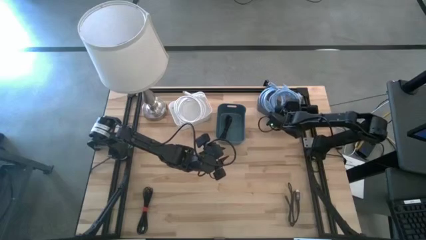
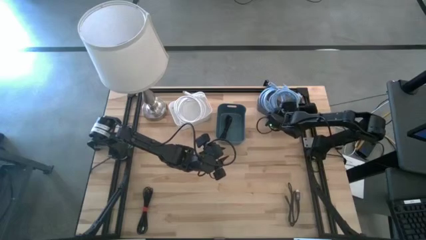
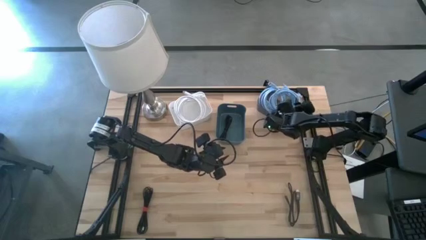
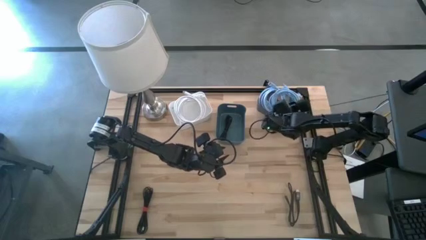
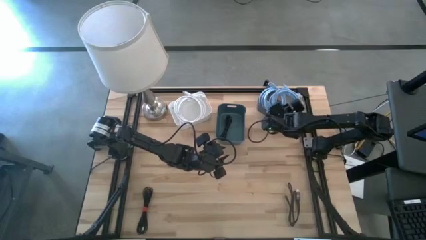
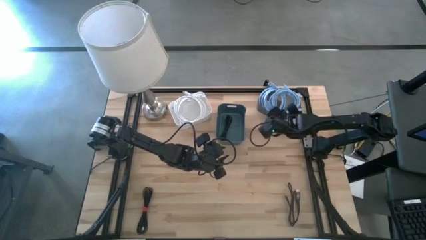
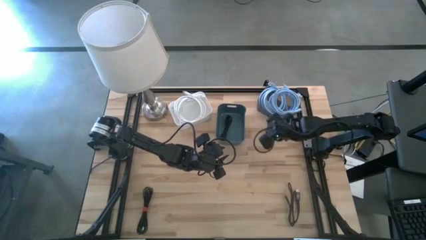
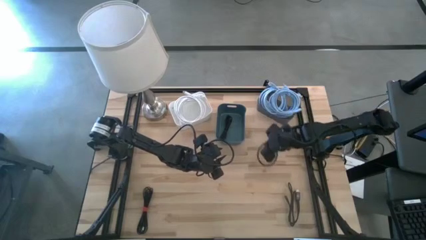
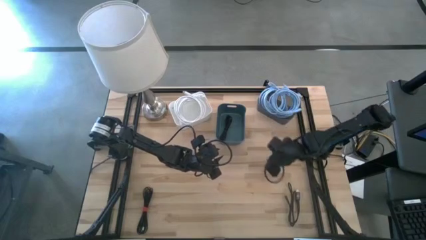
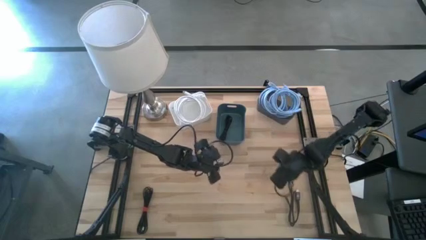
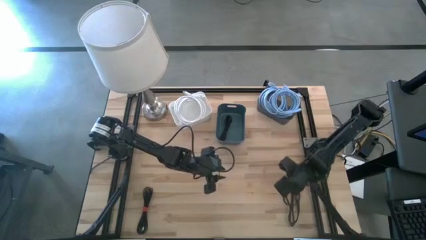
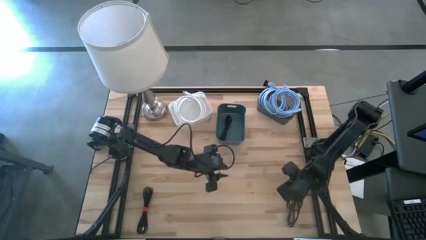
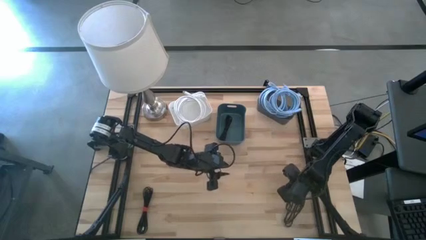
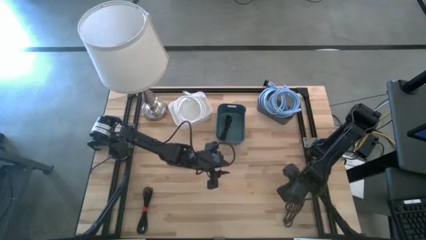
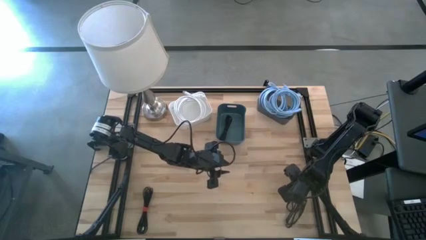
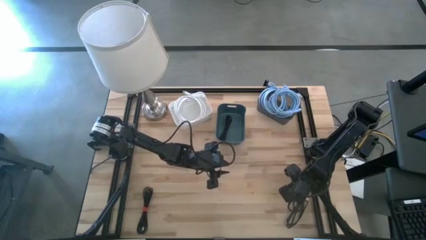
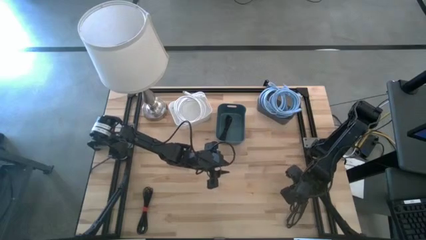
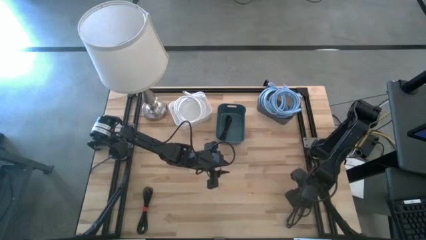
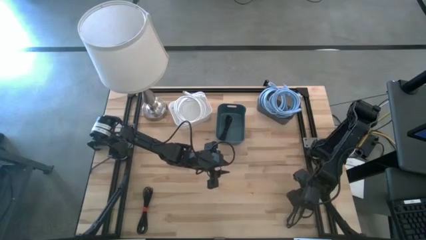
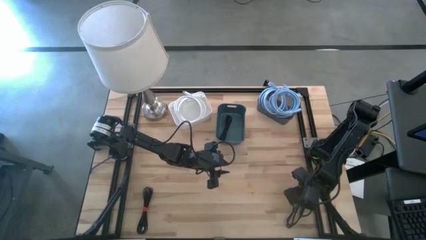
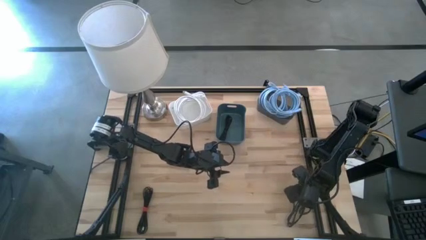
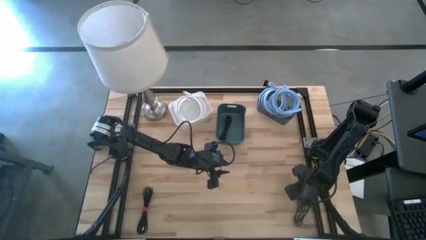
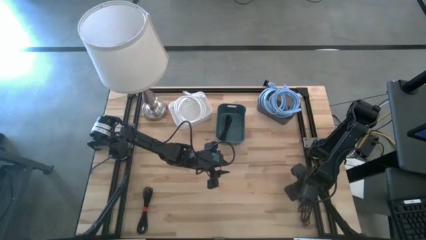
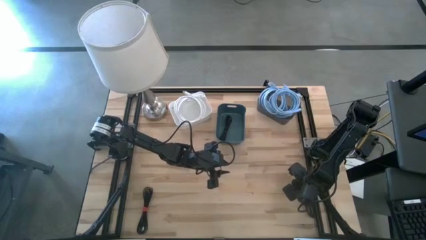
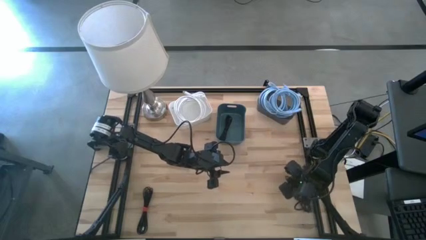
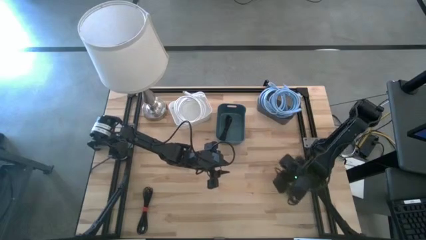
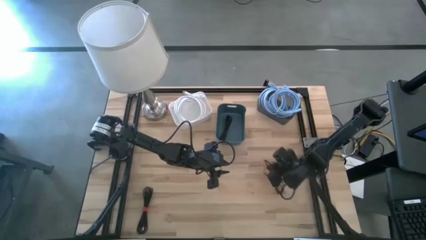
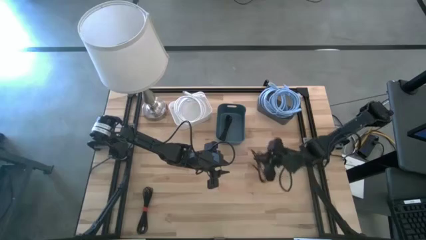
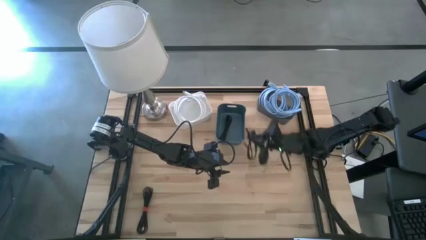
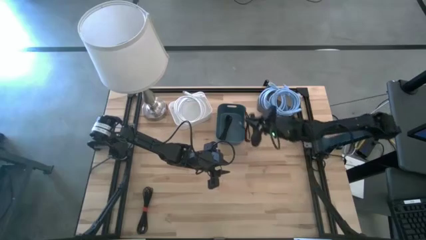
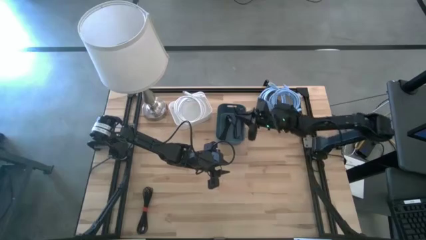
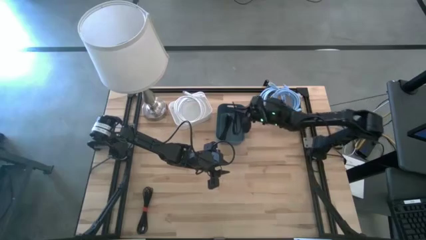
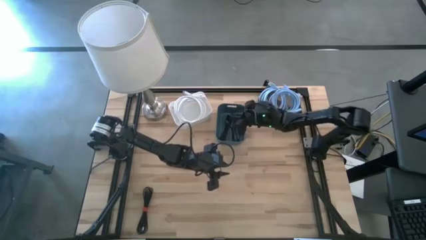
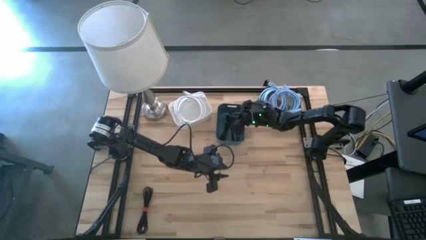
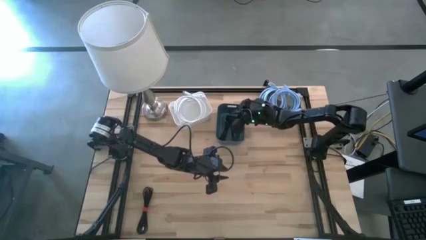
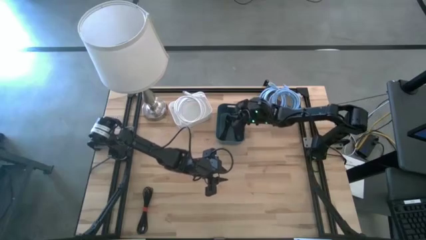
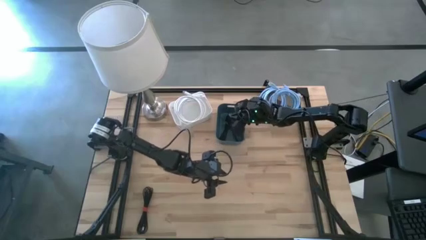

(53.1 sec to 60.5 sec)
Task: Sort HDMI cables
Put the right black HDMI cable into the blue bin

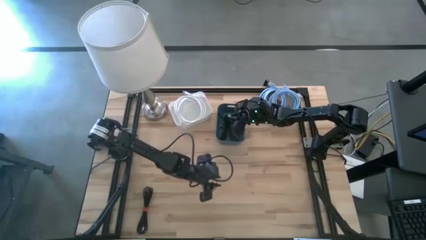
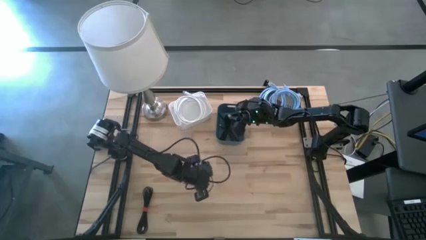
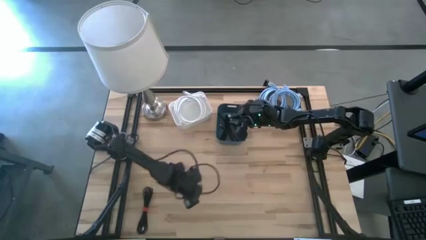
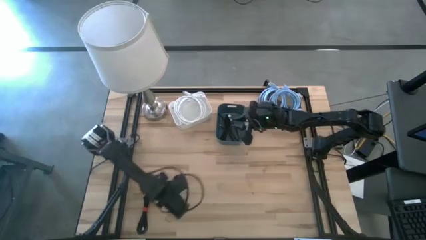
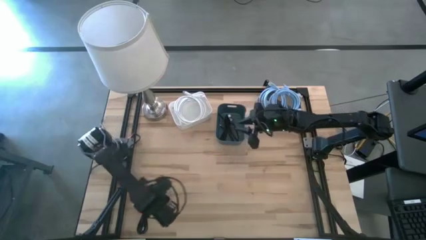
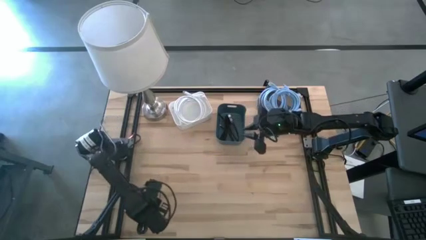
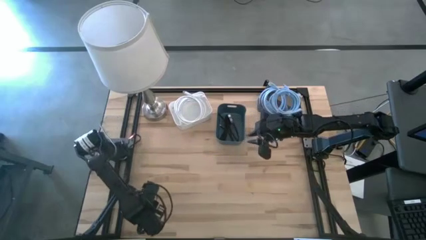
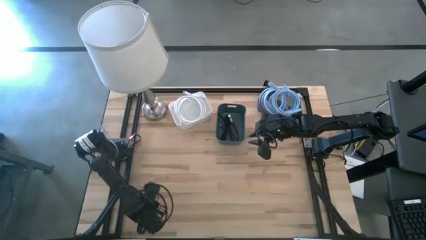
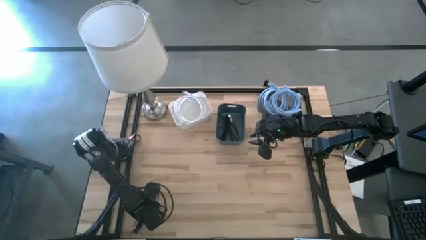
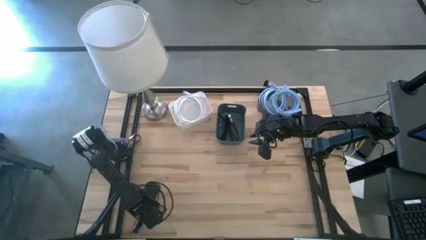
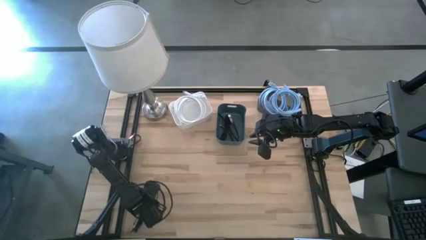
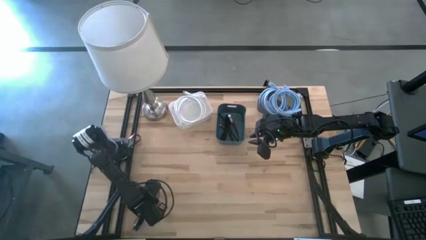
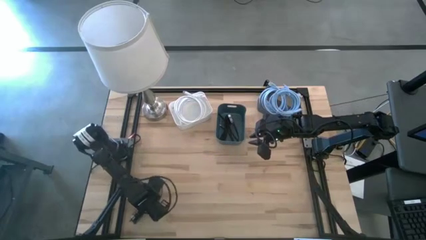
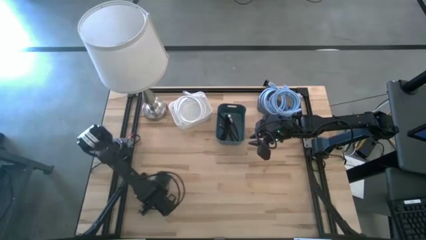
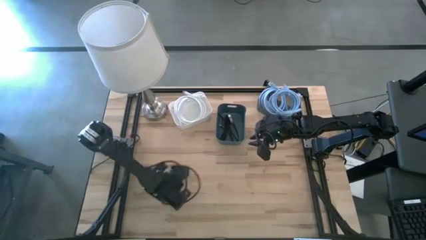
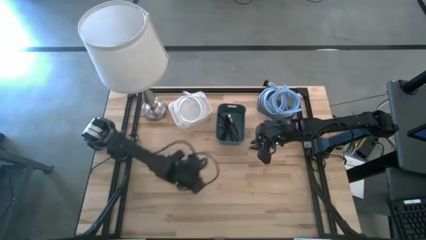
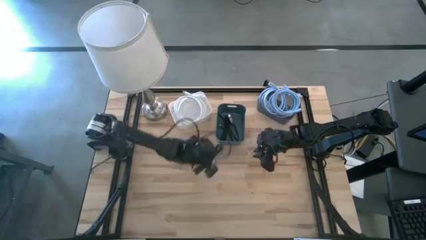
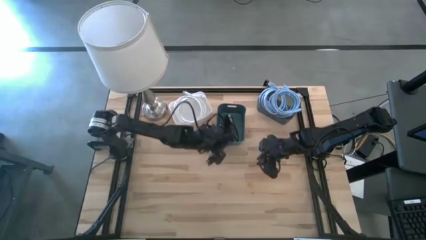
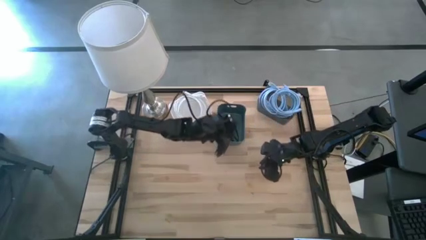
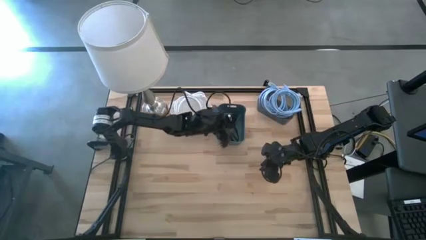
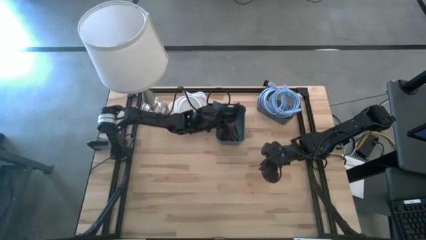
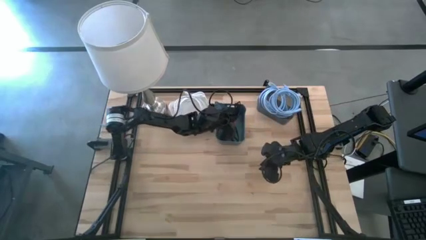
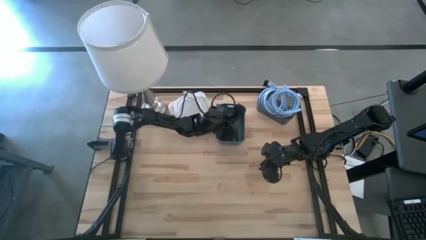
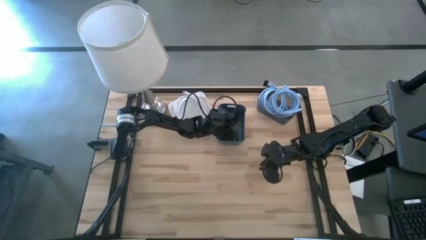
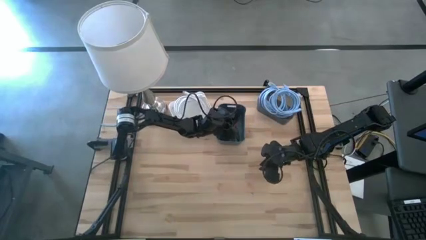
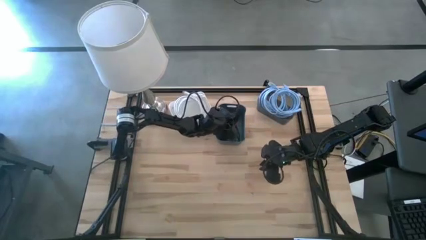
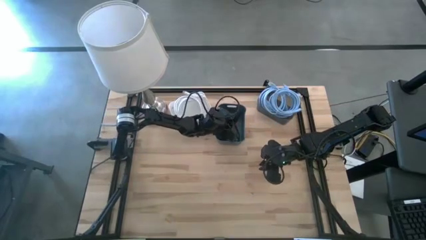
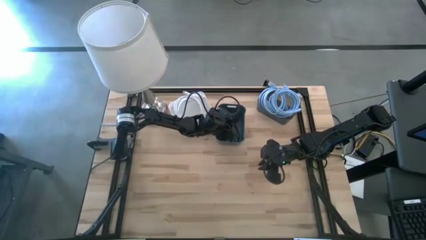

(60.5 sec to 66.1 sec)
Put the black HDMI cable into the blue bin

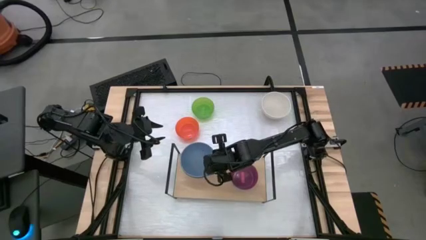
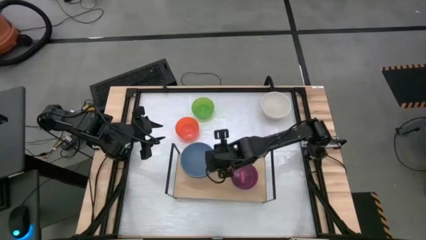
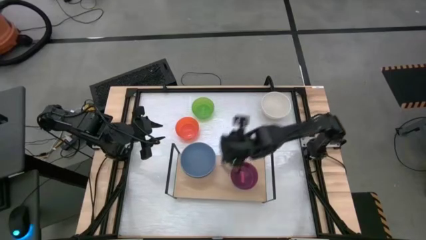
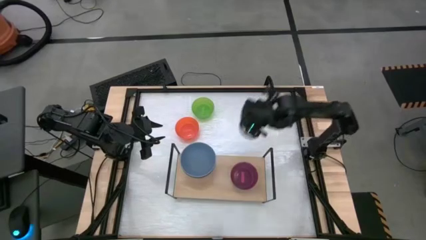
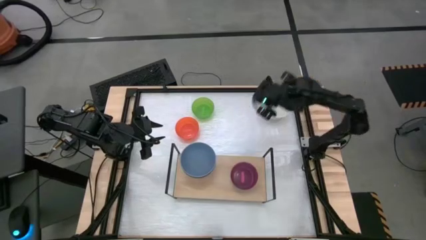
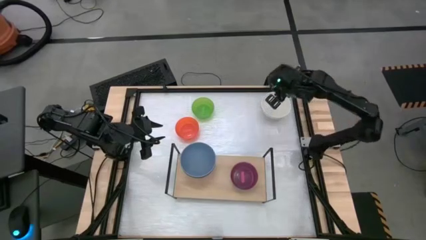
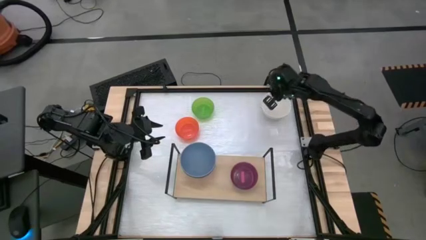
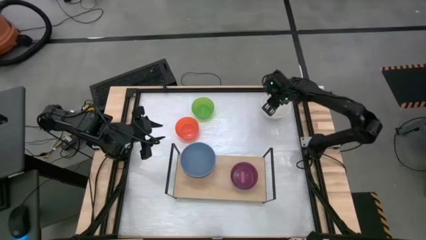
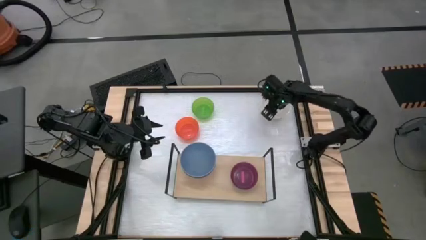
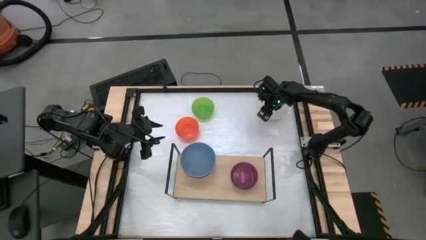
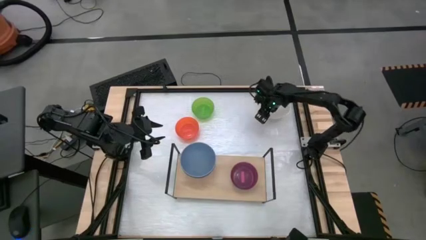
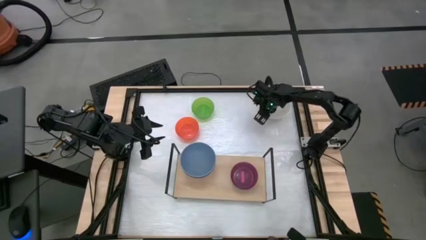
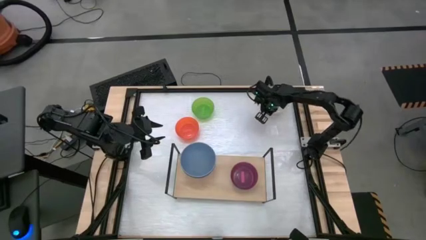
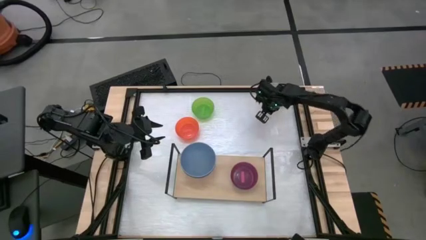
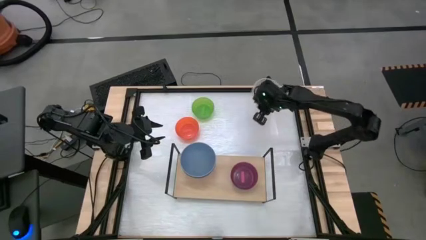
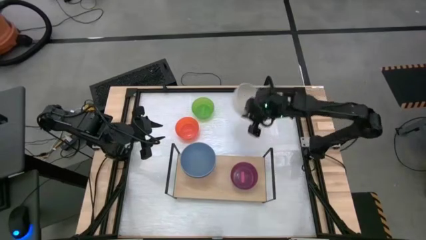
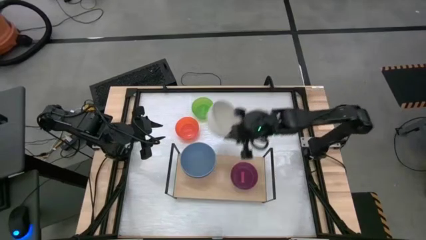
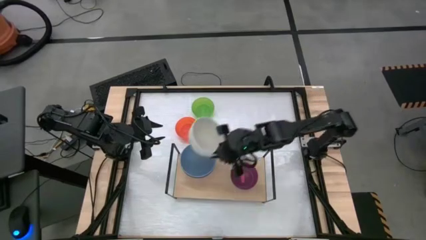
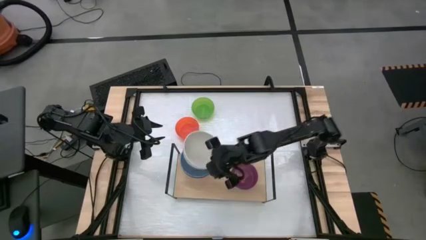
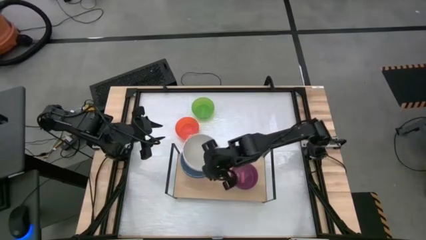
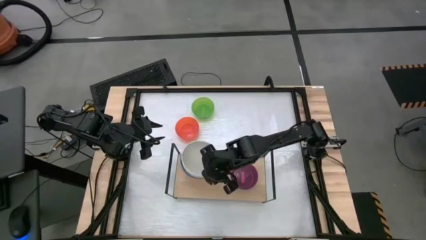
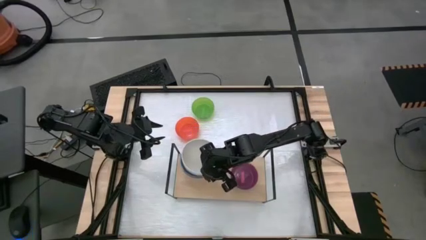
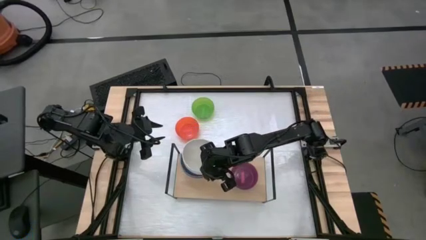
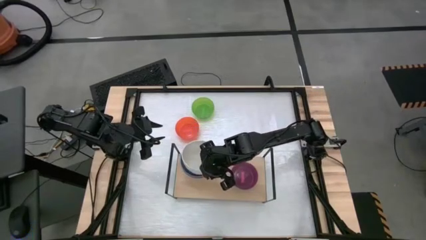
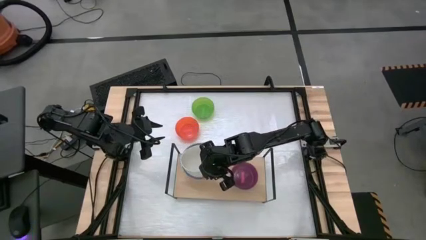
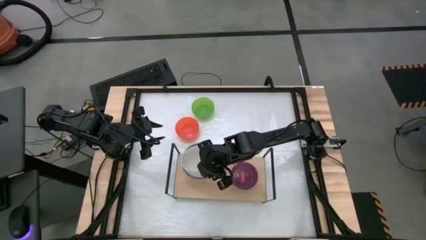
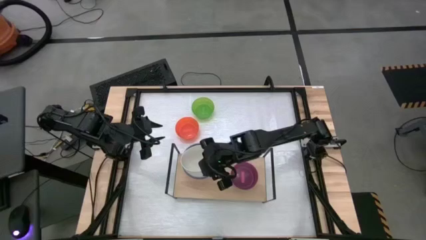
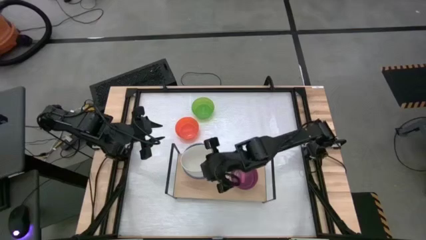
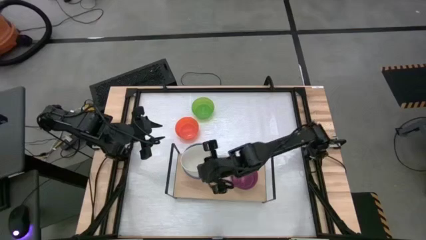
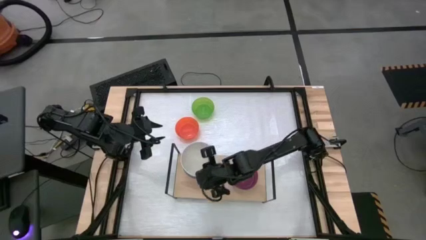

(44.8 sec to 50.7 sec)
Task: Place and stack bowls onto a shelf
Stack the big white bowl on top of the big light blue bowl on the shelf
